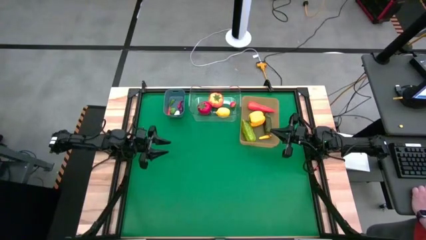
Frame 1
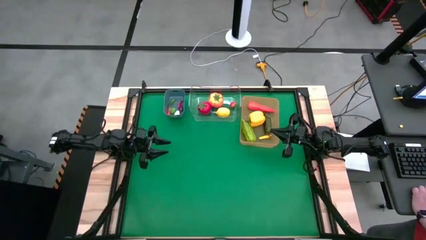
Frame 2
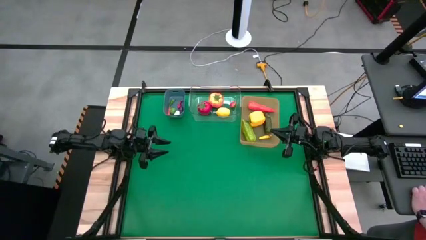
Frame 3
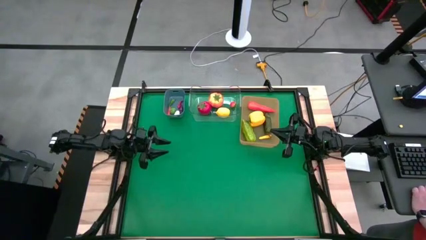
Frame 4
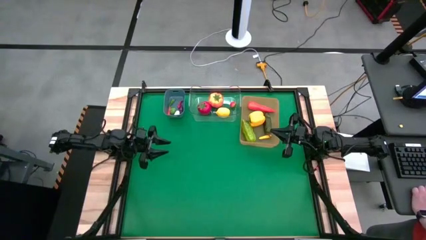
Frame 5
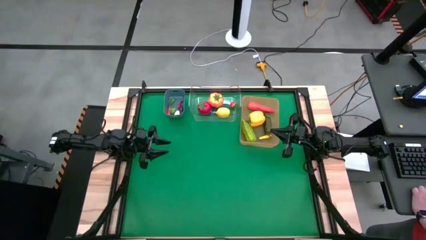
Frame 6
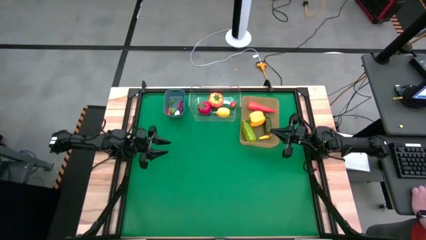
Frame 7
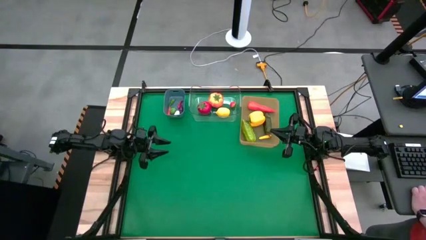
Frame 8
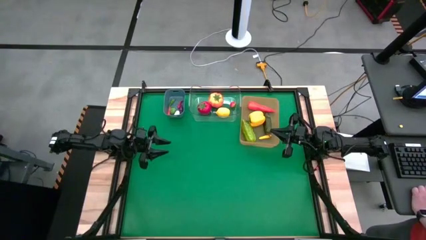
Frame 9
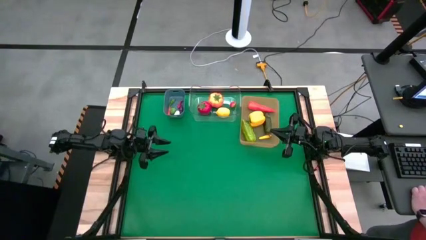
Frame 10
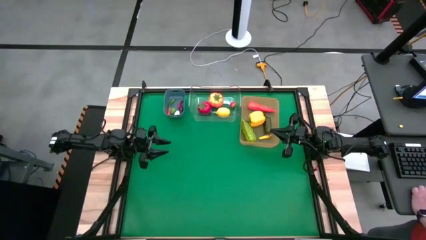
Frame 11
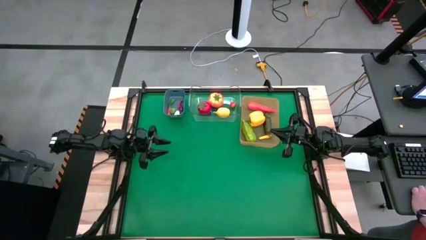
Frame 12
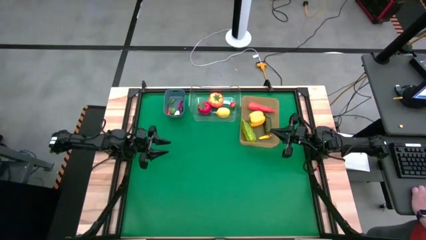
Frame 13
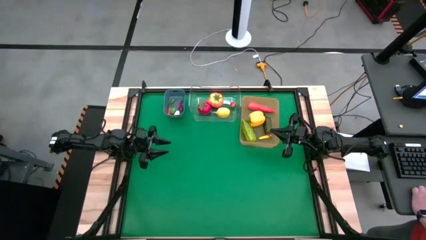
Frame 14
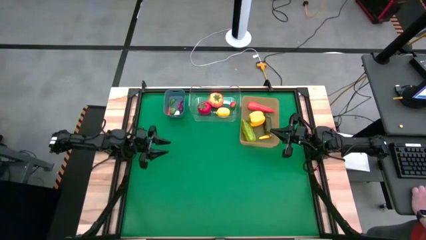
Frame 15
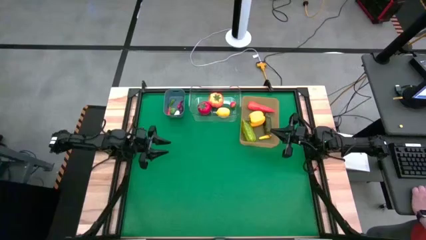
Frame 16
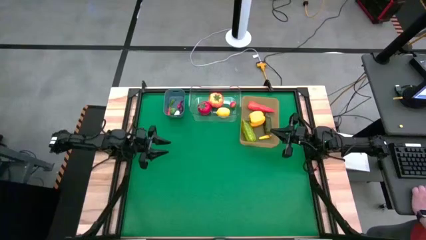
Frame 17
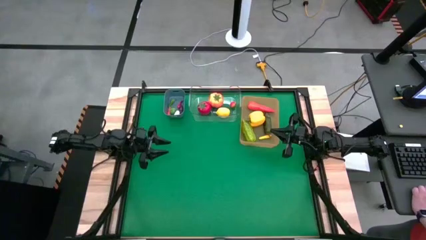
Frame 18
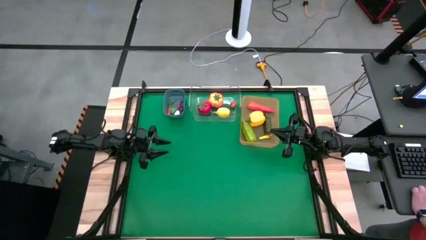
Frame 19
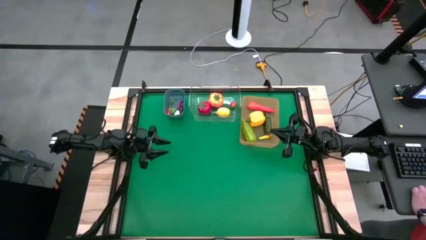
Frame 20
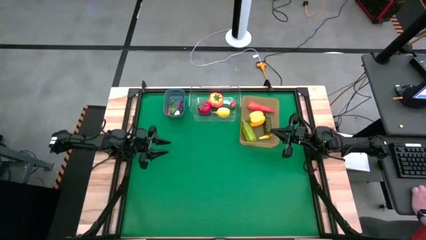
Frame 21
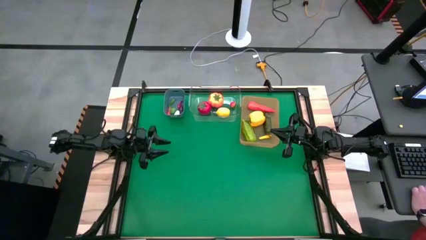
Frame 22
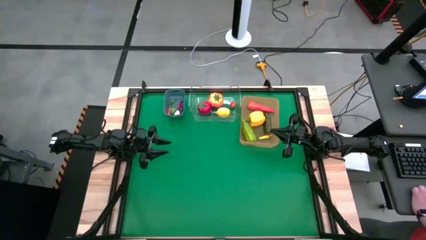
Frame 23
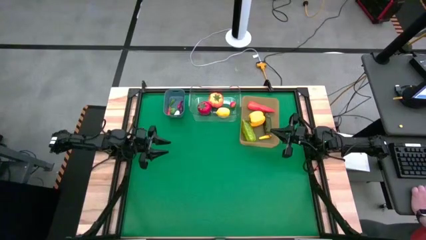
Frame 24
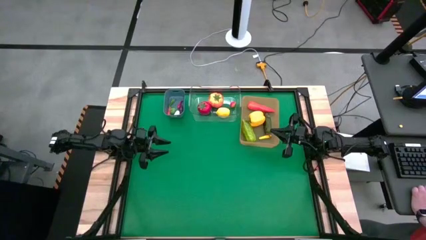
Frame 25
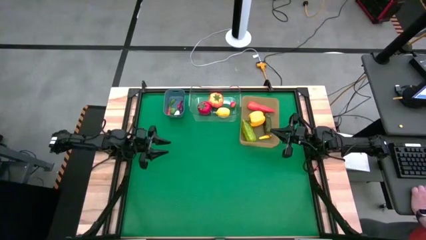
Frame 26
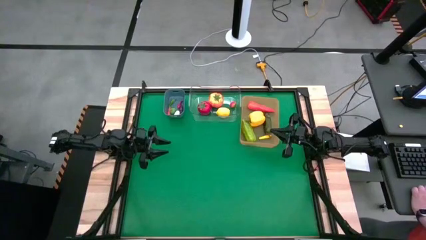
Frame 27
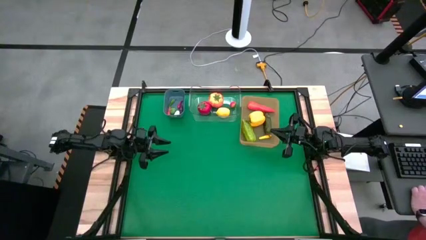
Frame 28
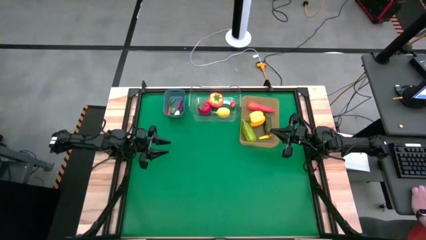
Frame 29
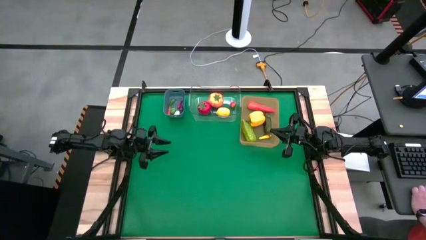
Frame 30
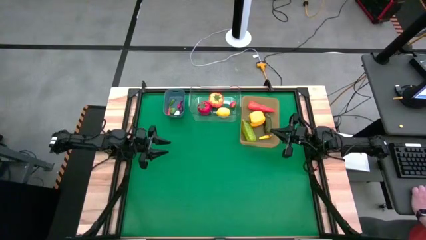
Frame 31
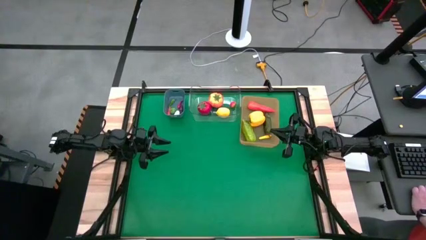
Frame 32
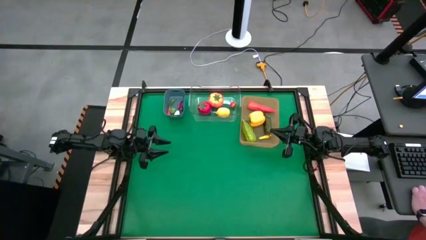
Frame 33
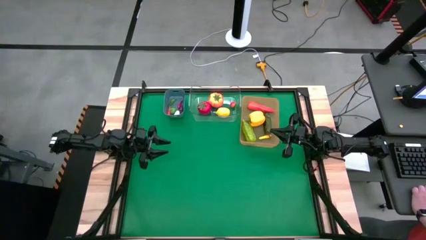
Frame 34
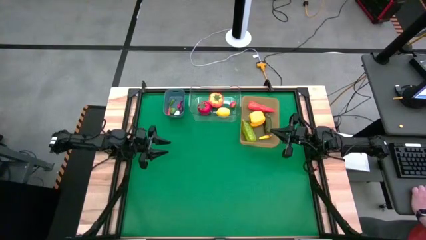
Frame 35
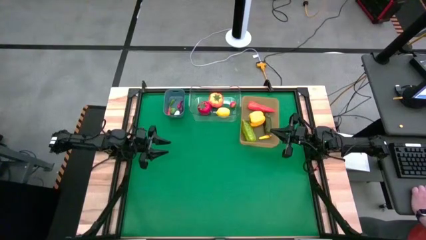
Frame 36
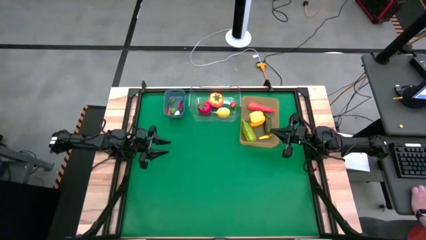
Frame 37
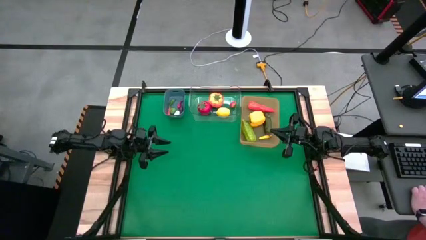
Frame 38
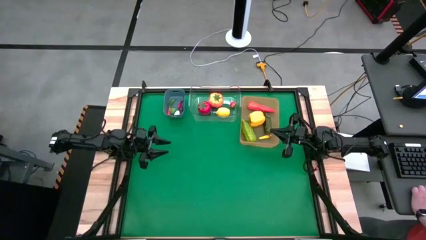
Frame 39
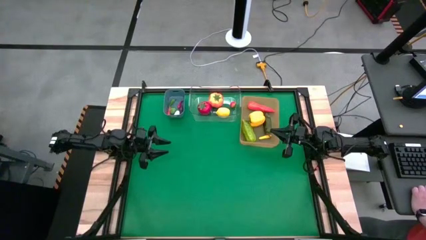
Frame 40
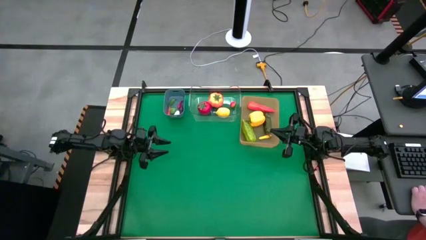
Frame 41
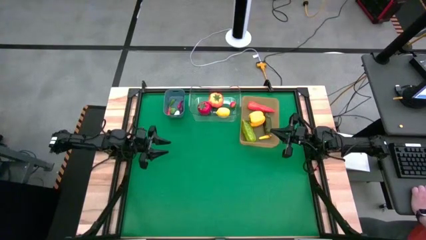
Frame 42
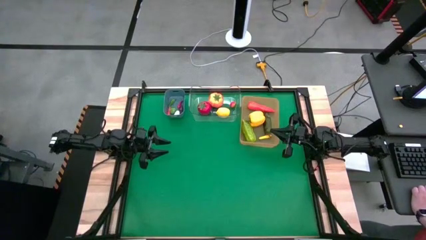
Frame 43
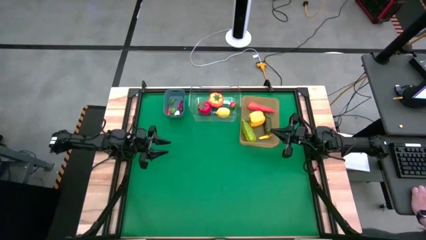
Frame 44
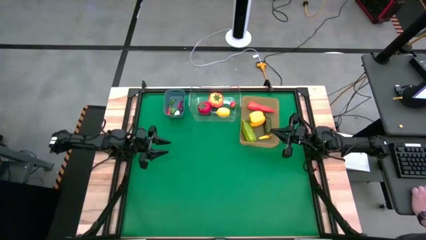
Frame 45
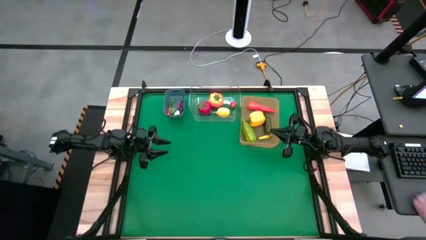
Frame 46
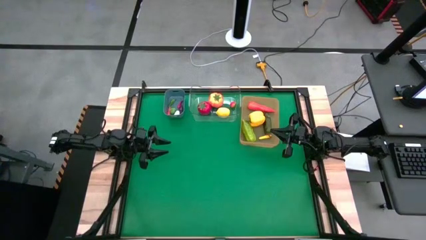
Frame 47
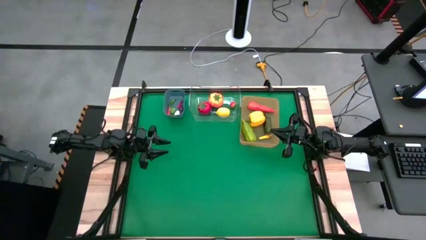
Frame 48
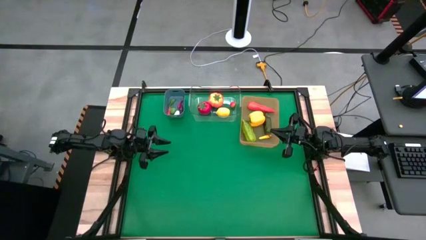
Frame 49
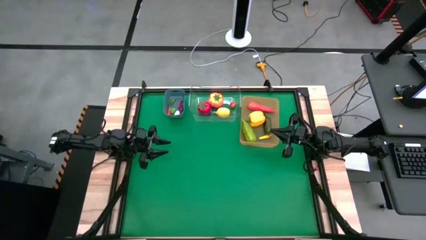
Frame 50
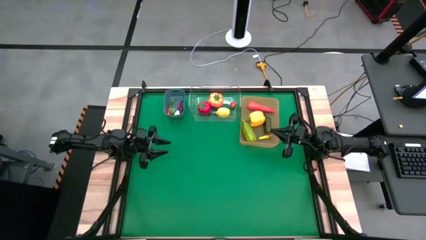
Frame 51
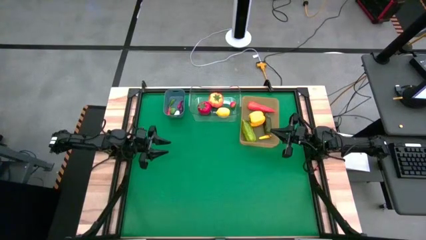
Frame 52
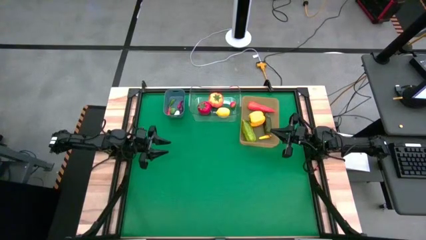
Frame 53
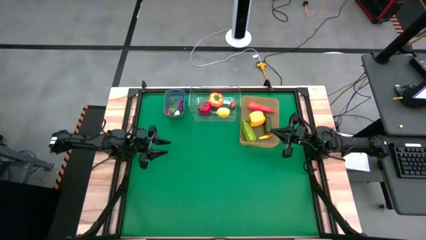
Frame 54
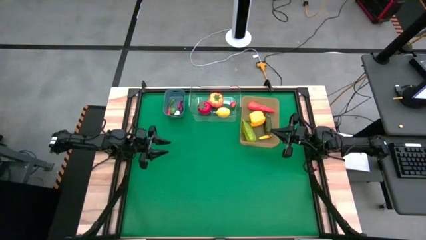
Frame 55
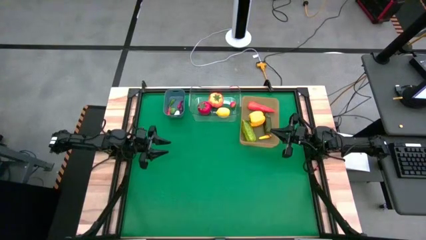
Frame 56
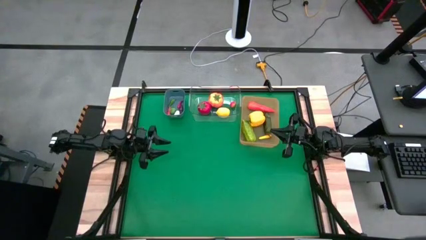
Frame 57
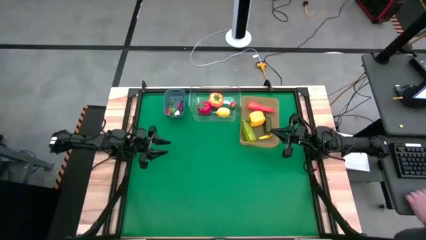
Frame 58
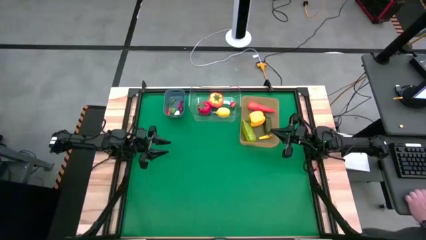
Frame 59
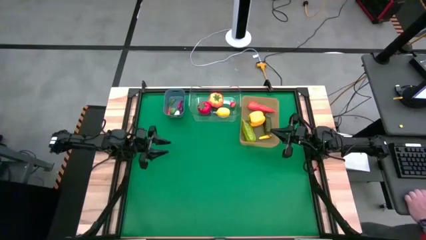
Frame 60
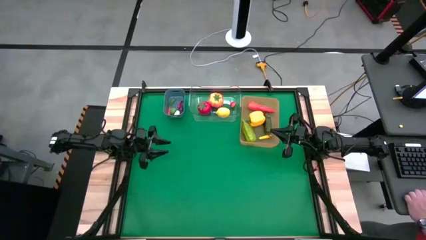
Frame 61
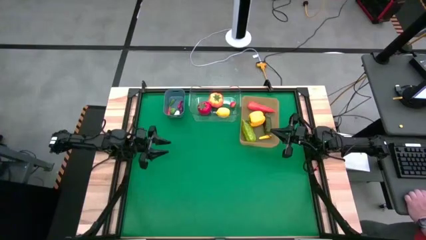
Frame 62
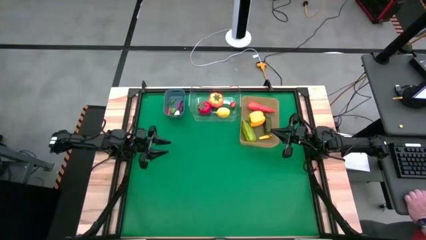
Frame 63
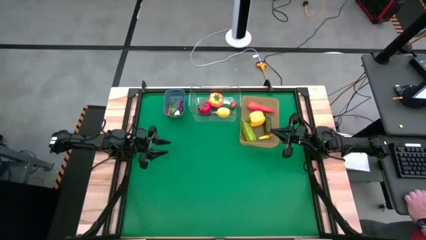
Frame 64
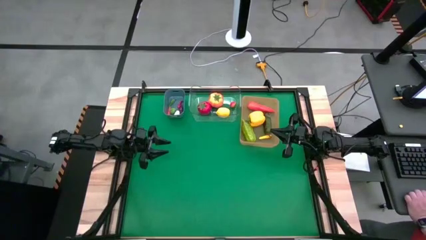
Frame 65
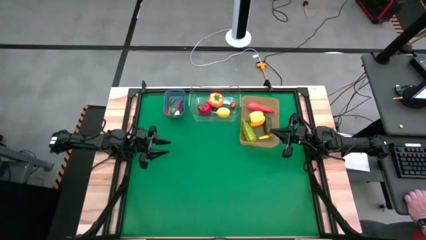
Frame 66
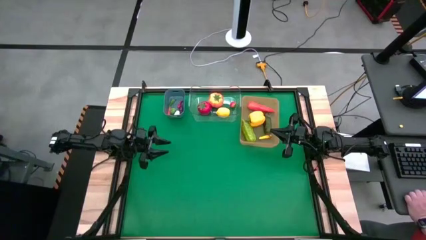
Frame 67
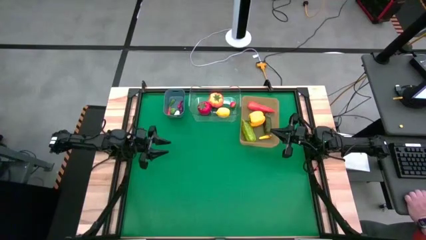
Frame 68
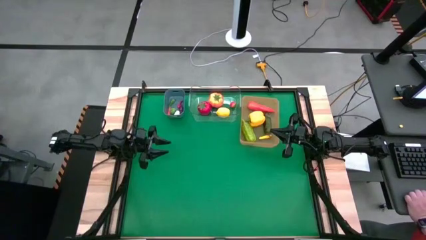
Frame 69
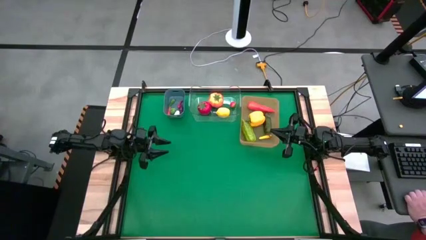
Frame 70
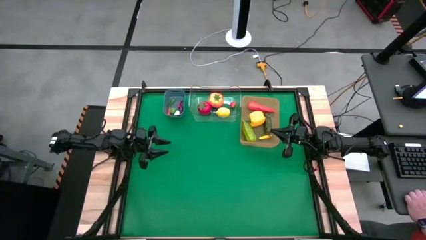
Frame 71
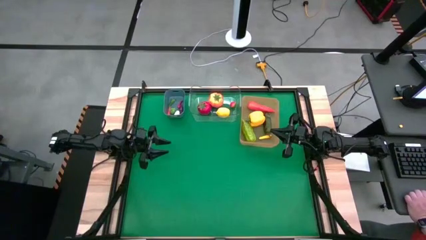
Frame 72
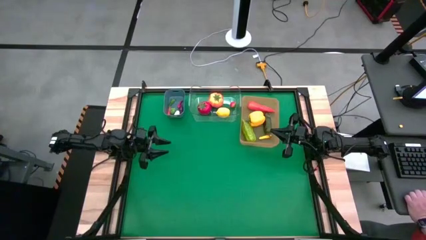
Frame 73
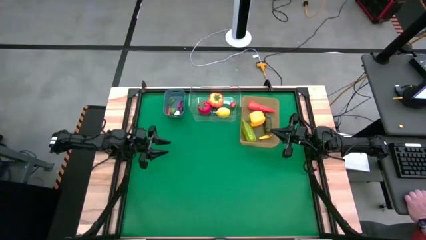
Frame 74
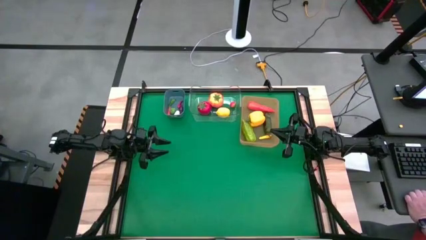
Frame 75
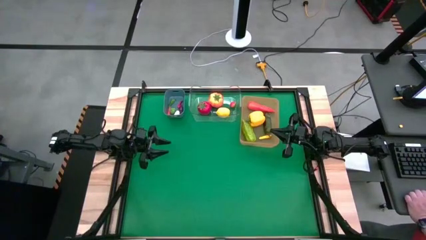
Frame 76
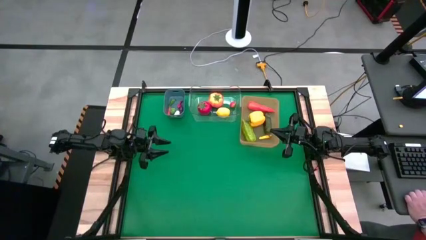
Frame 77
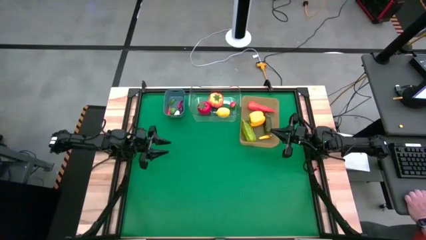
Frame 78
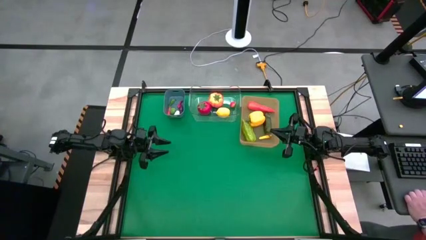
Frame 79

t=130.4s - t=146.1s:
Task: Sort produce into baskets
Return to Home Position
